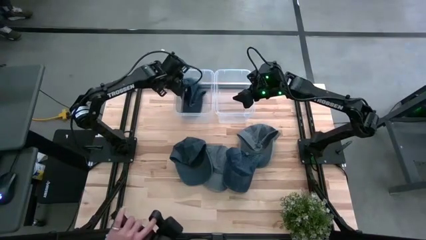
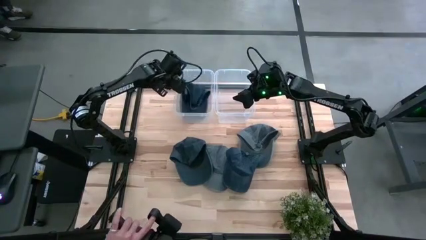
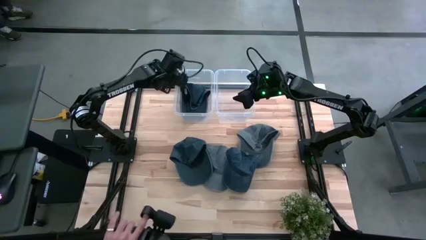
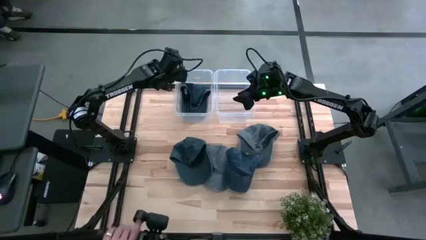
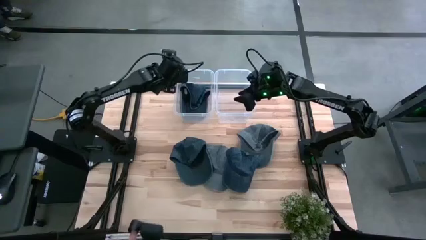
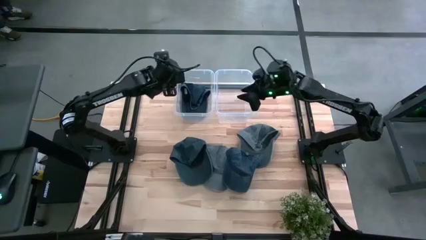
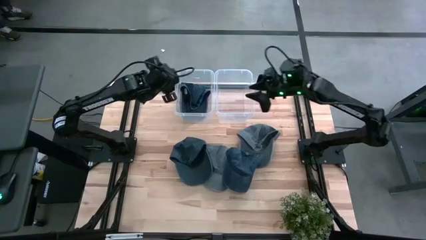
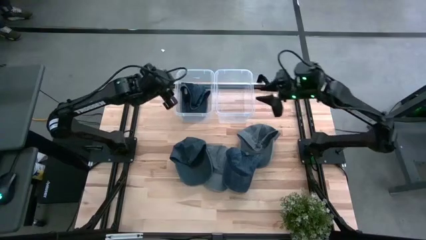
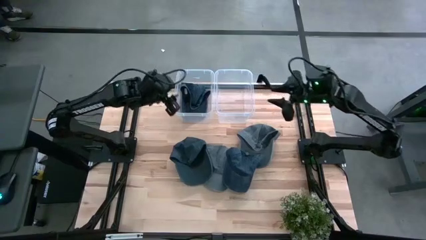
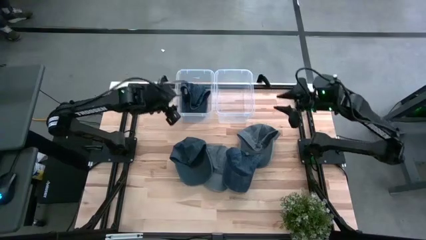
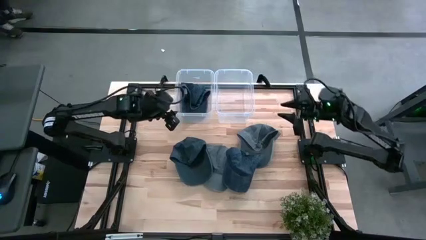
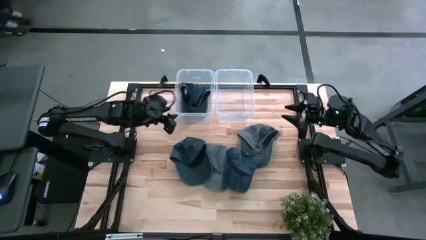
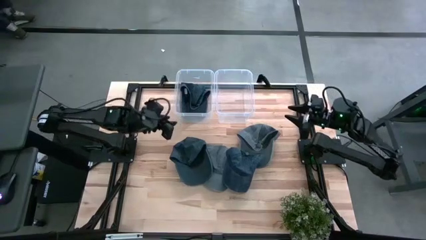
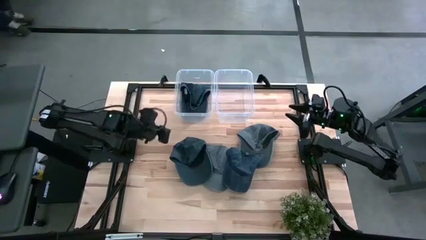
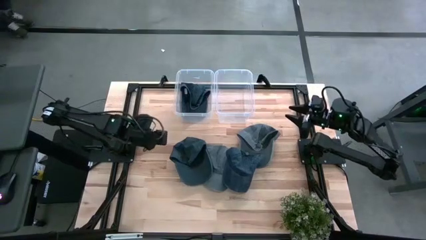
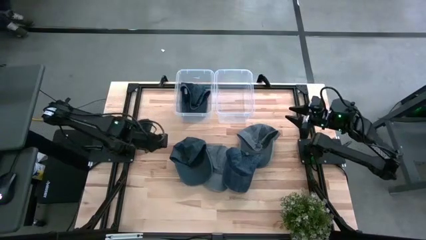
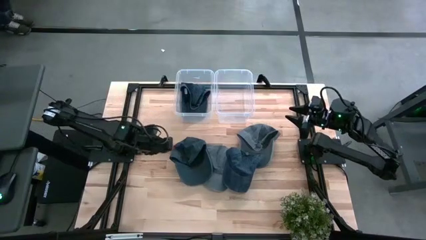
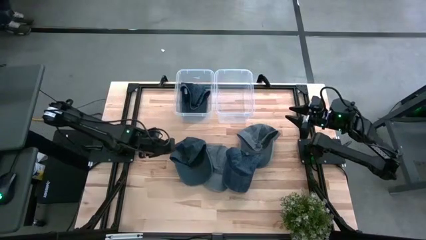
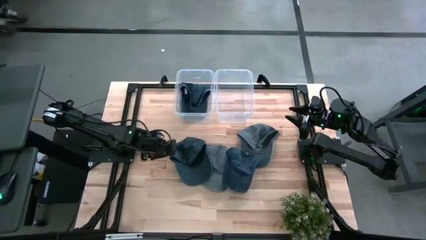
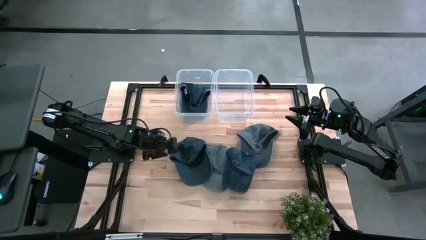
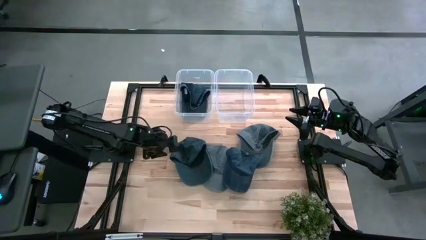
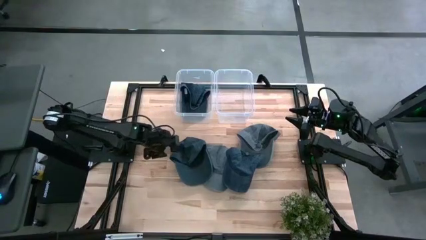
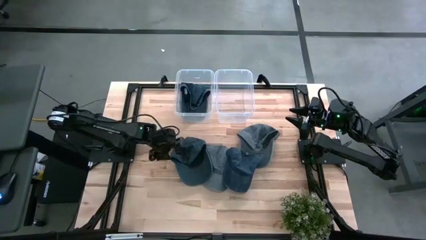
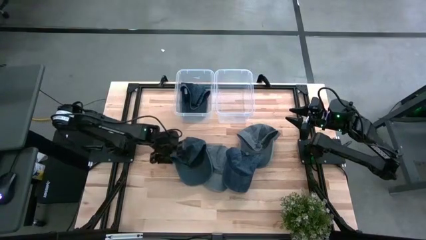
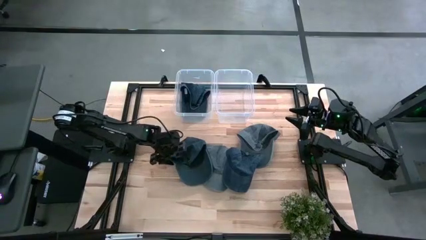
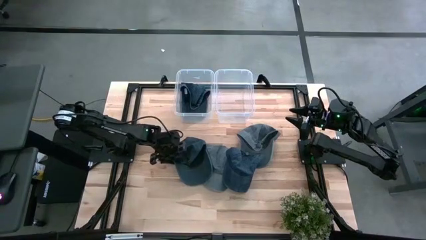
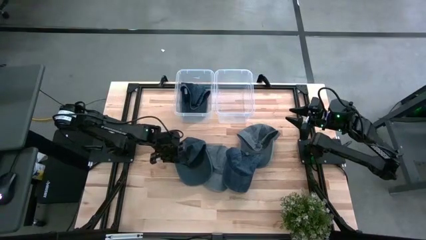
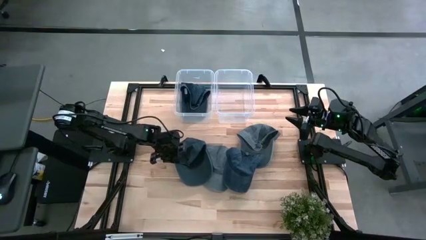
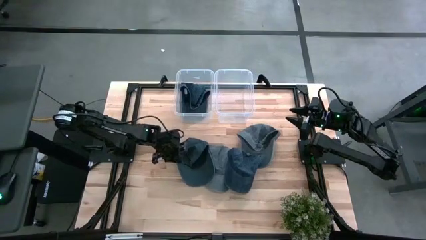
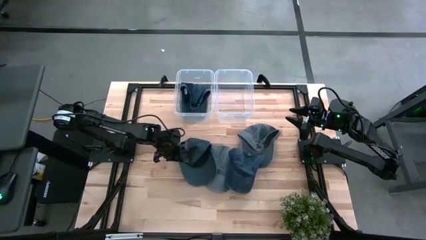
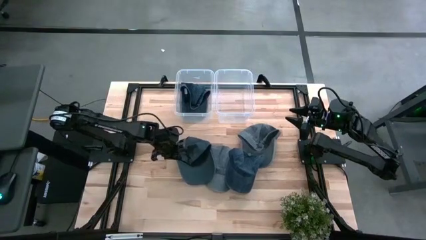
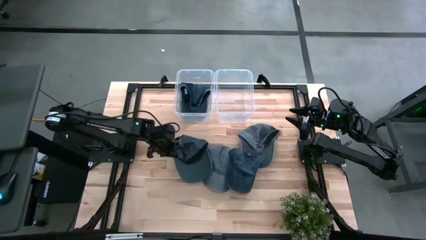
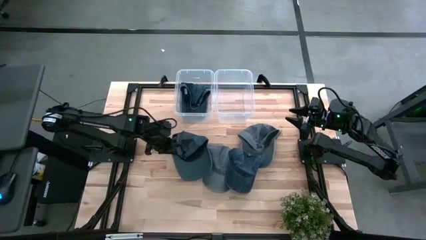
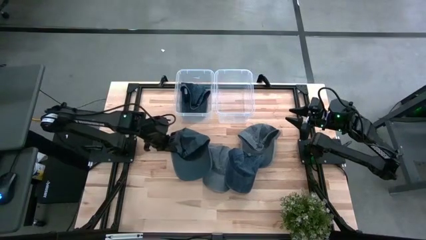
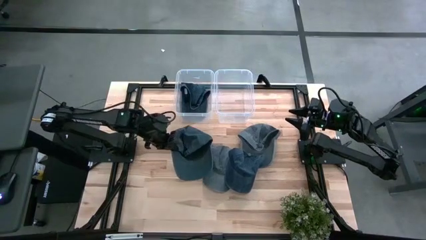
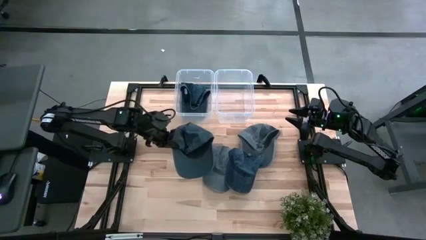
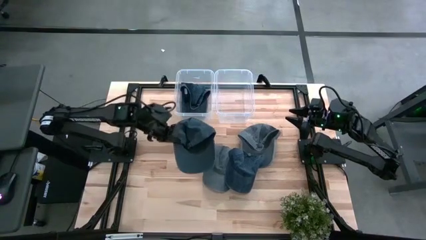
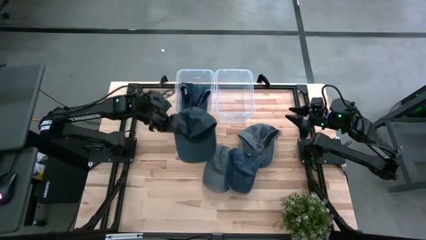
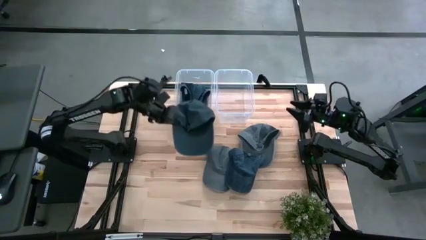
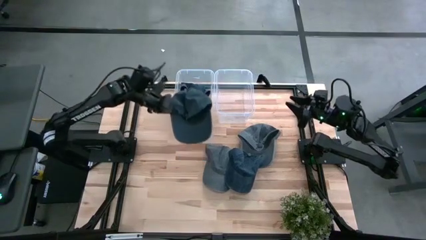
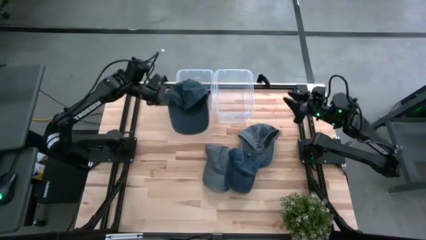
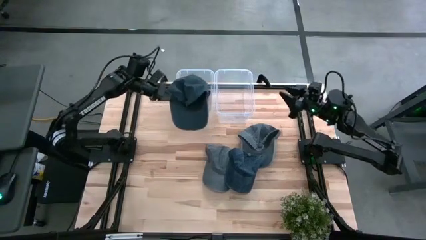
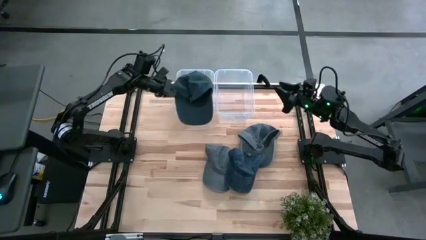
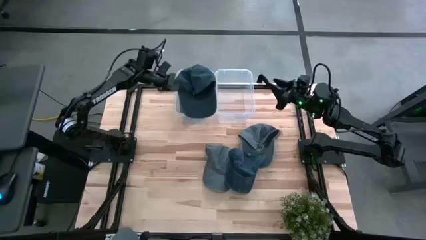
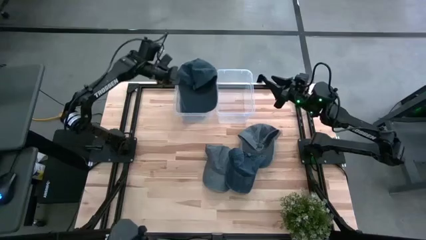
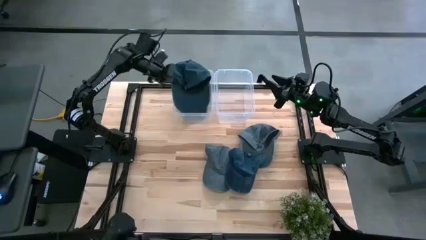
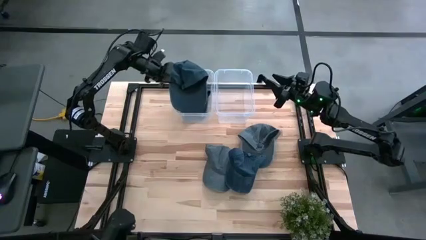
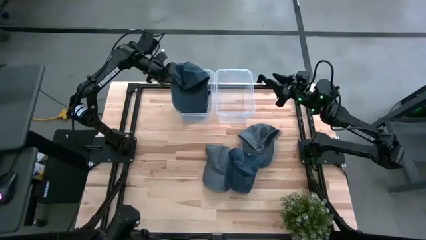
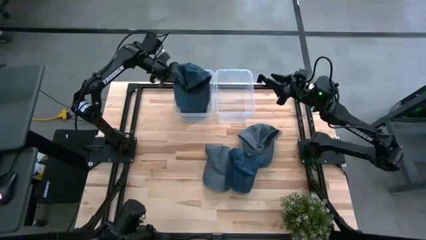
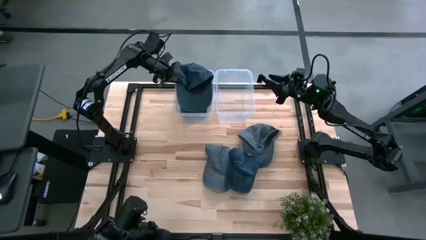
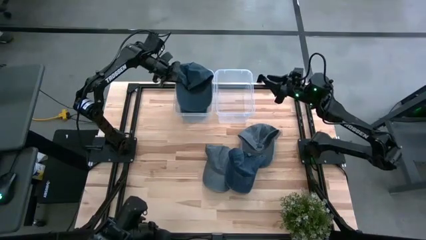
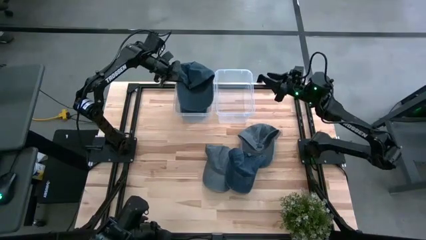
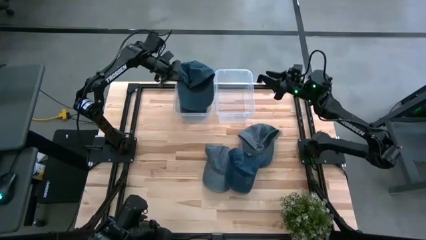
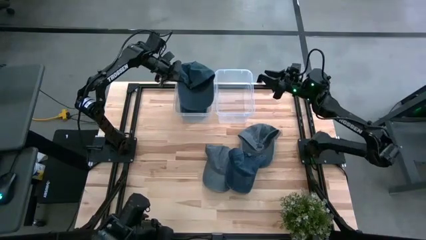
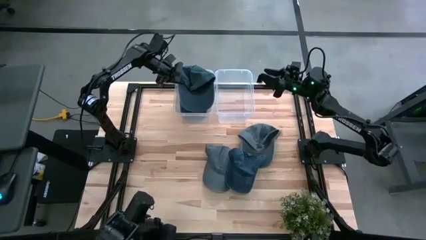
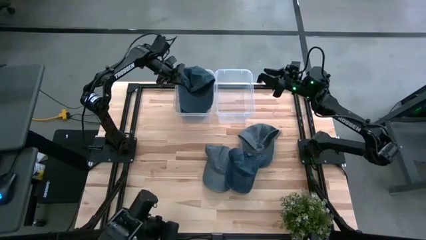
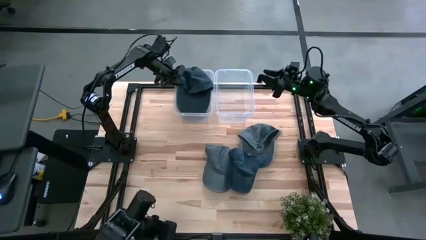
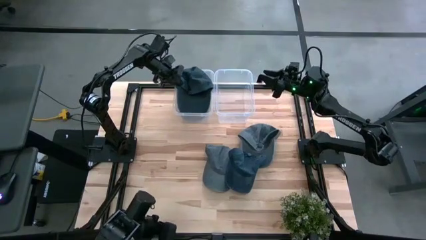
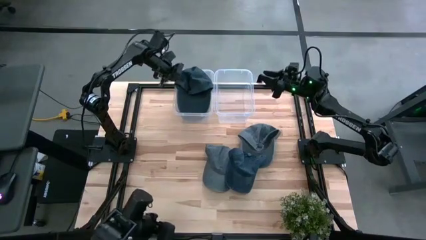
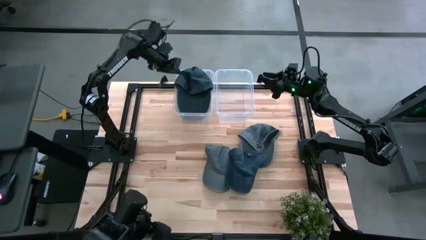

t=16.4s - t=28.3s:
Task: Pick and place caps into container
Put the left blue cap into the left transparent container

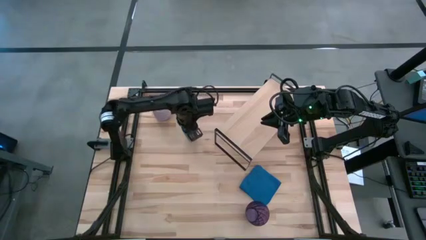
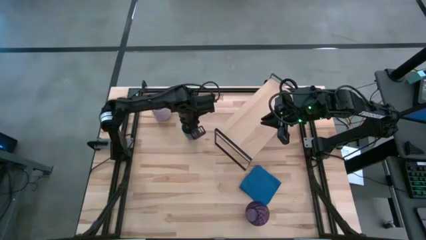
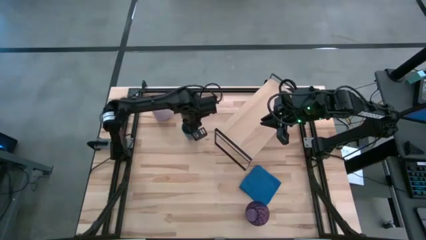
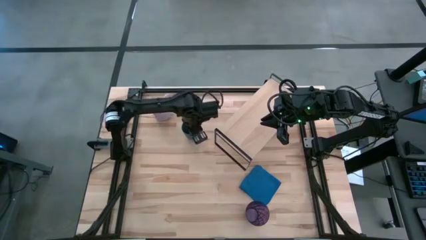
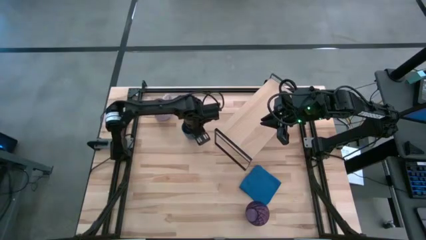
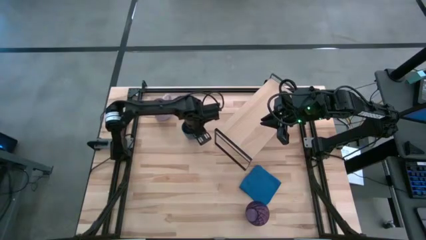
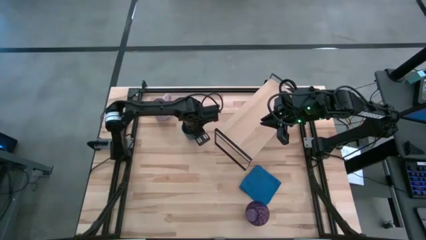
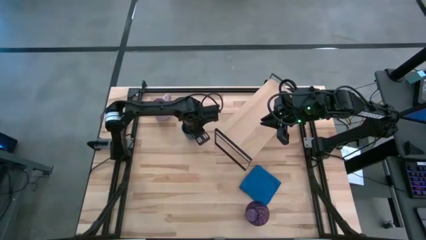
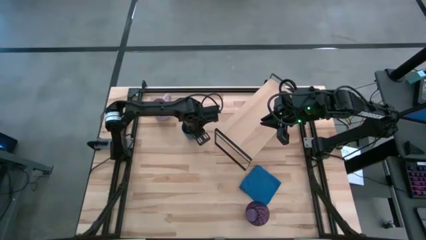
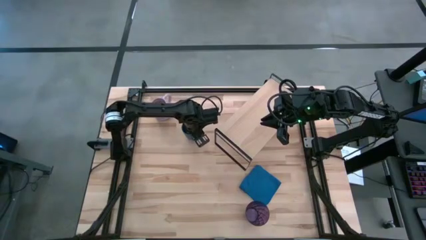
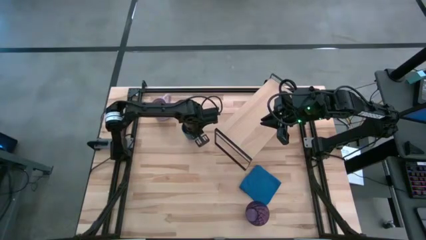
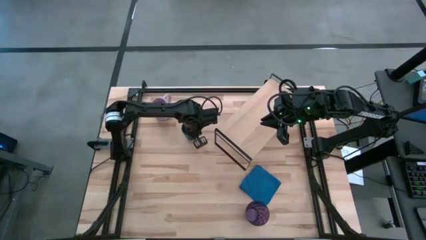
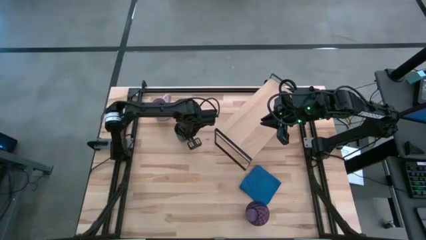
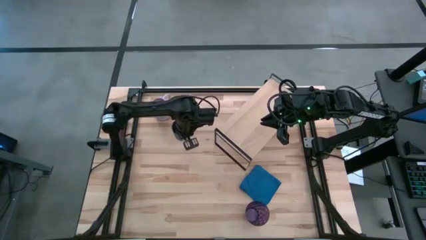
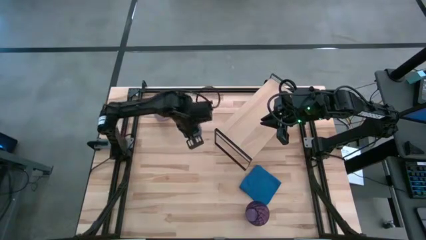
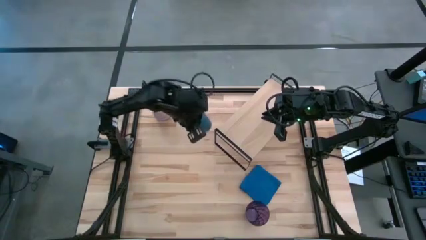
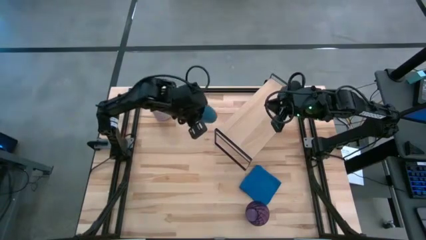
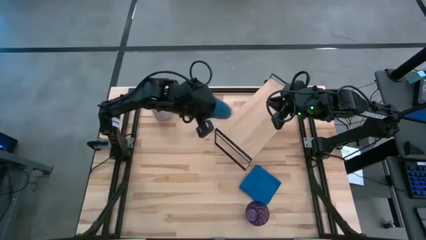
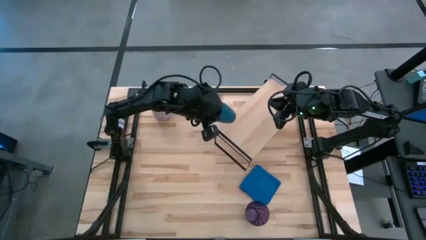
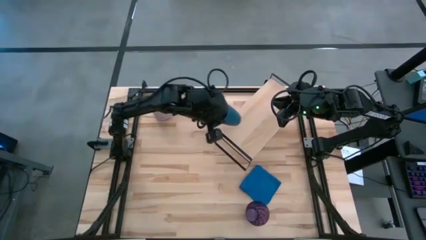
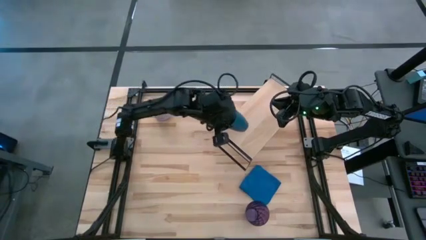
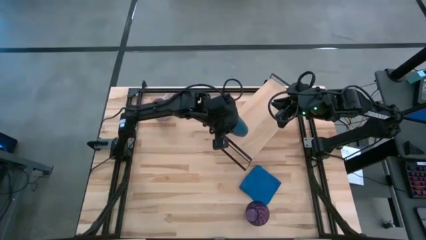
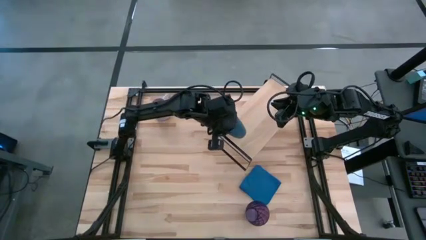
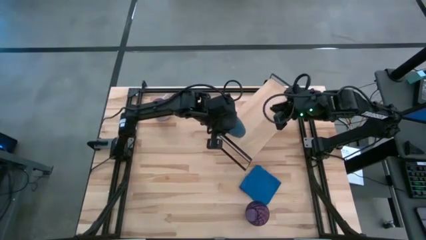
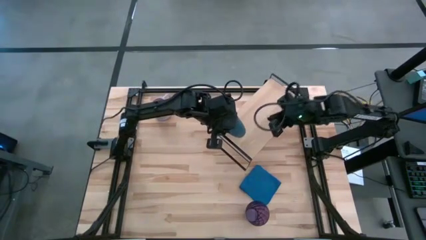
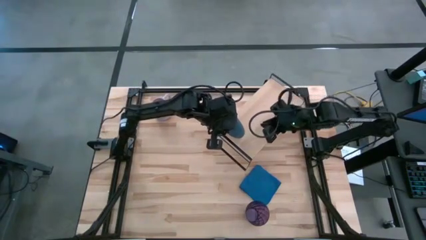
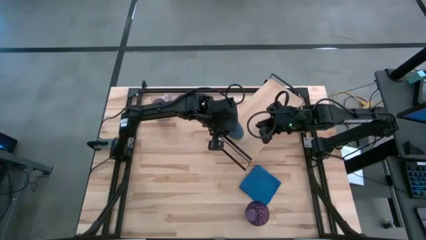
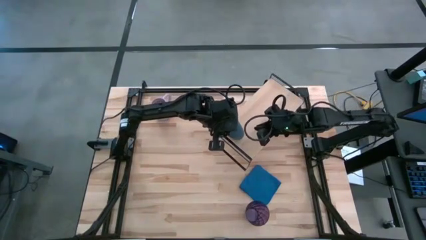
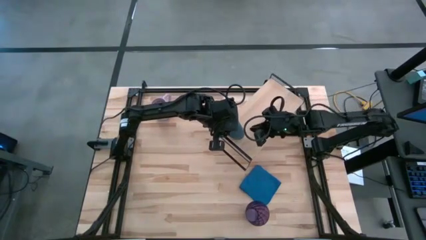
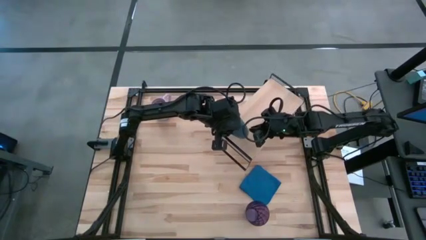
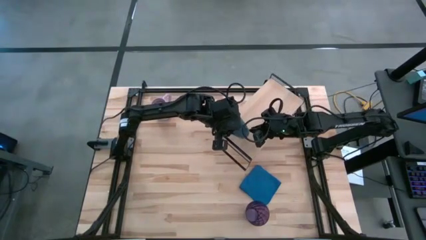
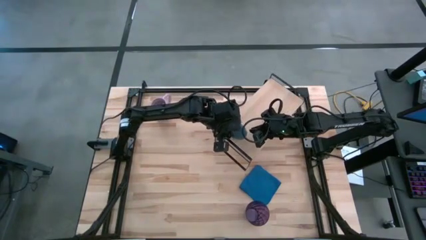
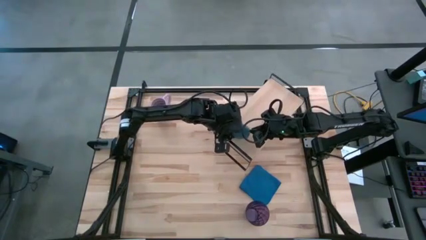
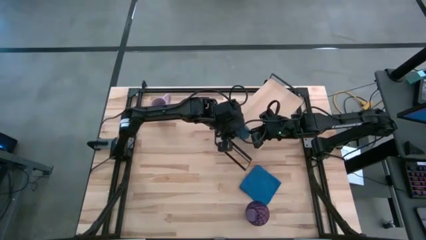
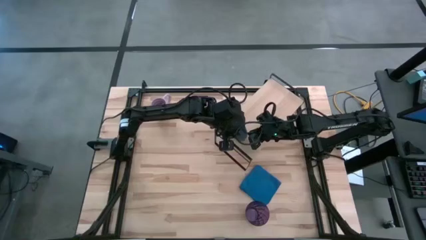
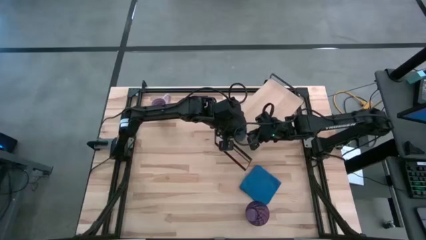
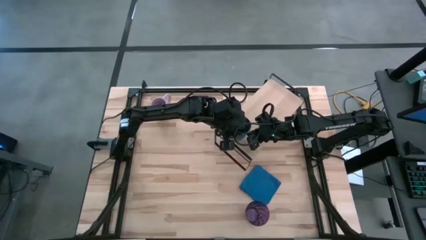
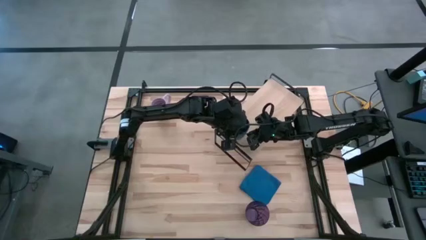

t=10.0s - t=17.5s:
Task: Stack small to large cups/mugs on shelf
Put the blue cup on the shelf
